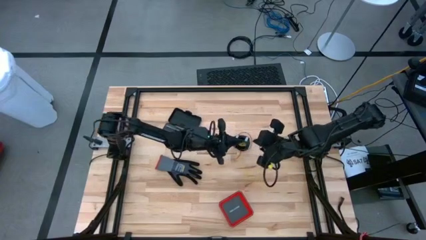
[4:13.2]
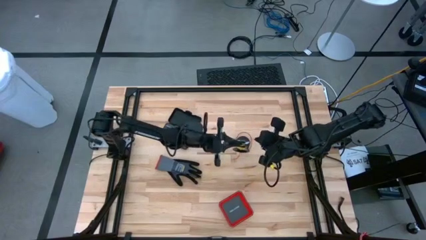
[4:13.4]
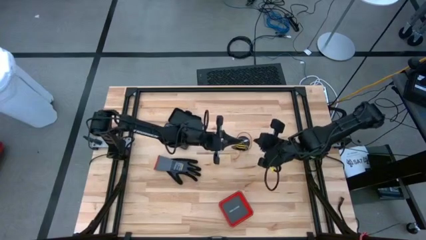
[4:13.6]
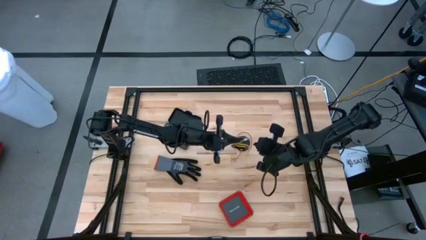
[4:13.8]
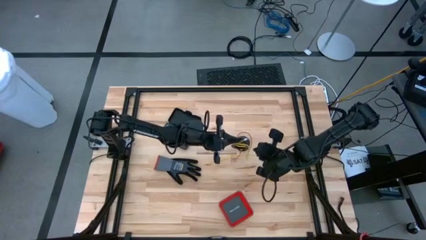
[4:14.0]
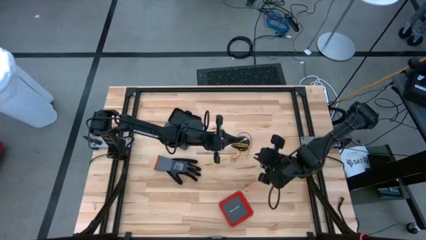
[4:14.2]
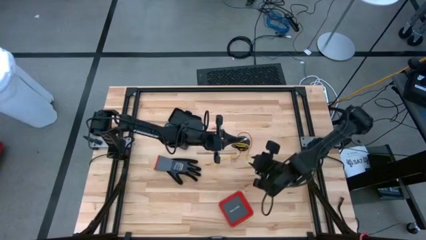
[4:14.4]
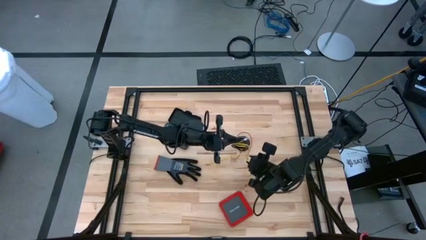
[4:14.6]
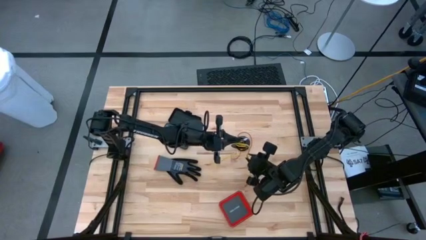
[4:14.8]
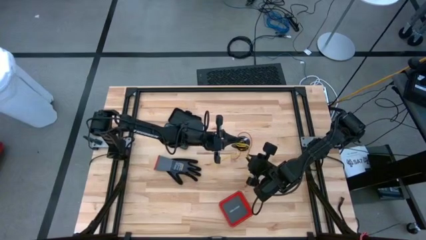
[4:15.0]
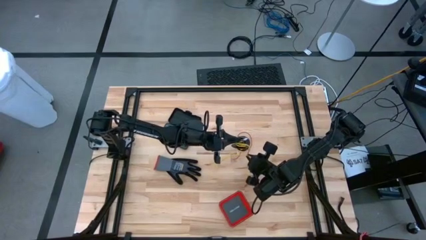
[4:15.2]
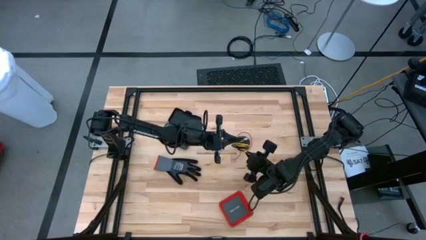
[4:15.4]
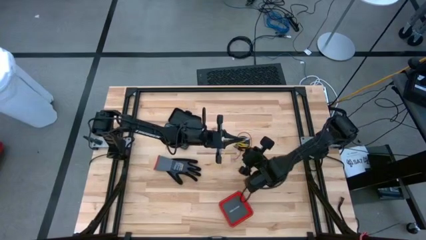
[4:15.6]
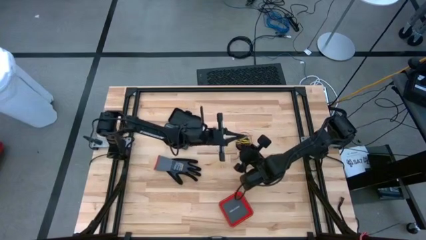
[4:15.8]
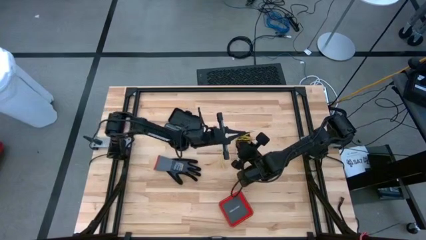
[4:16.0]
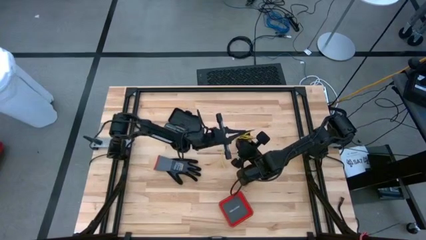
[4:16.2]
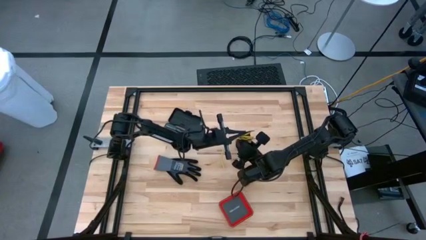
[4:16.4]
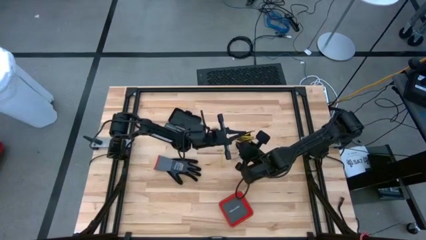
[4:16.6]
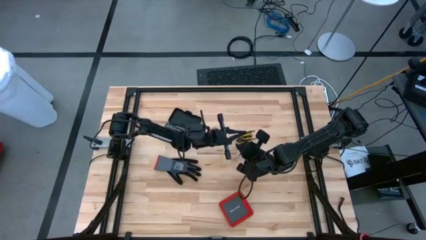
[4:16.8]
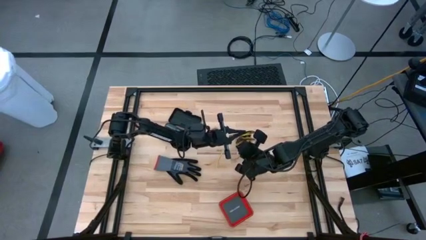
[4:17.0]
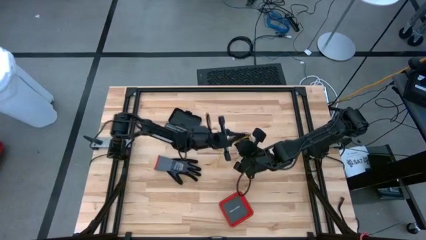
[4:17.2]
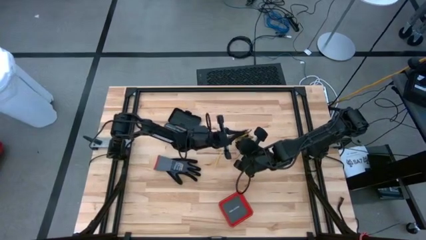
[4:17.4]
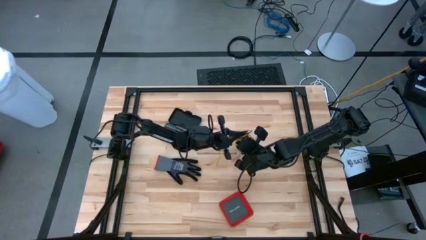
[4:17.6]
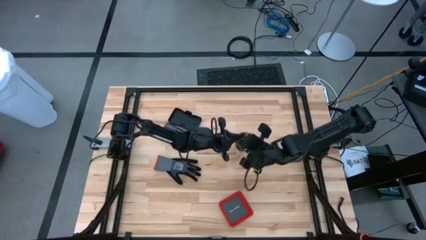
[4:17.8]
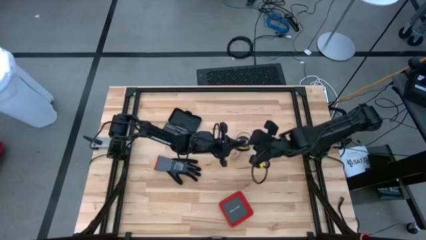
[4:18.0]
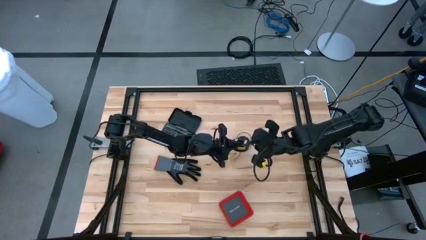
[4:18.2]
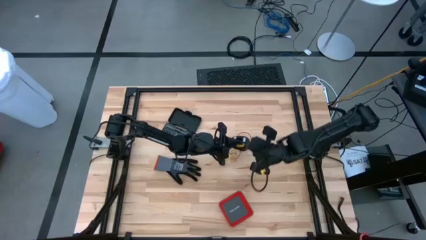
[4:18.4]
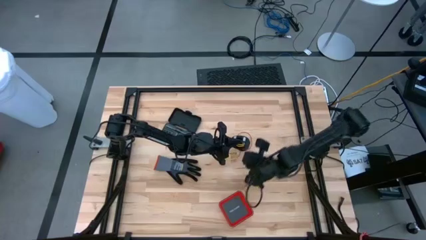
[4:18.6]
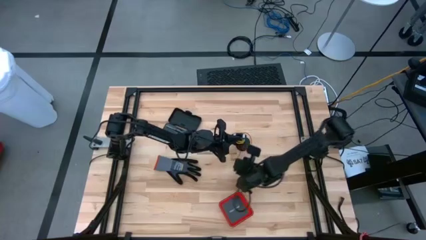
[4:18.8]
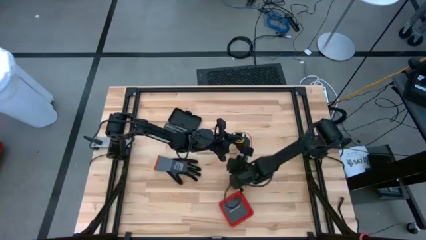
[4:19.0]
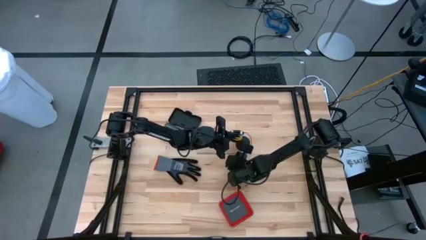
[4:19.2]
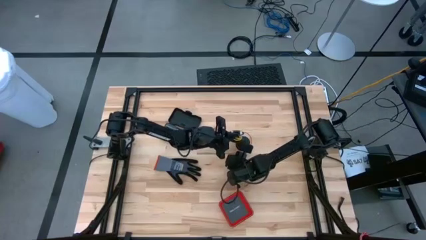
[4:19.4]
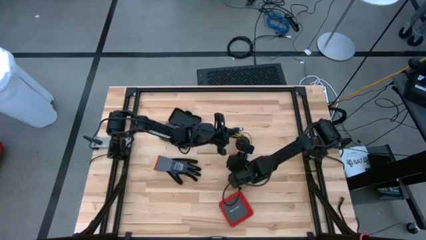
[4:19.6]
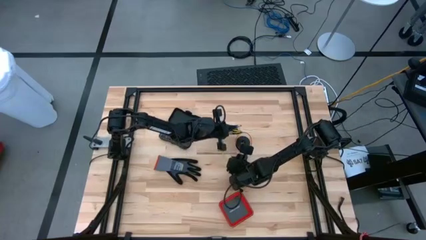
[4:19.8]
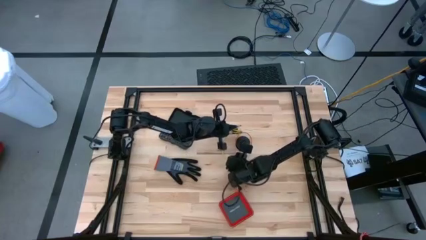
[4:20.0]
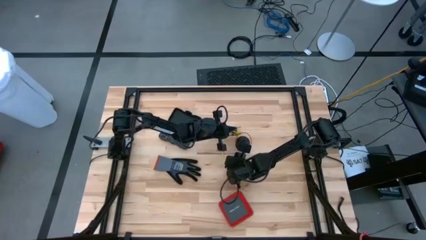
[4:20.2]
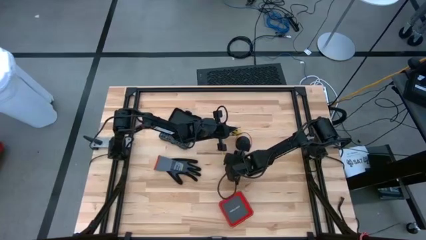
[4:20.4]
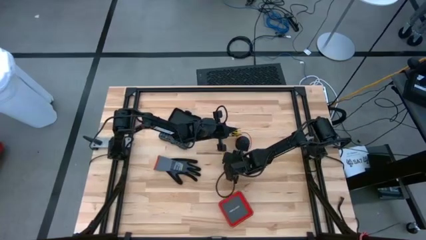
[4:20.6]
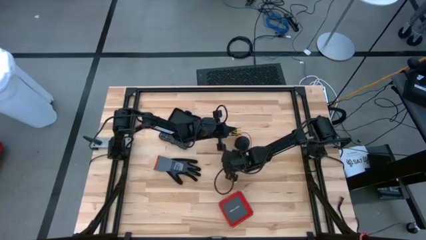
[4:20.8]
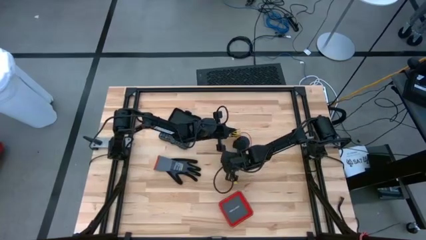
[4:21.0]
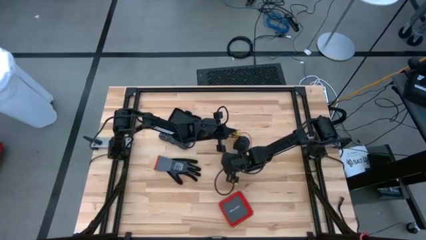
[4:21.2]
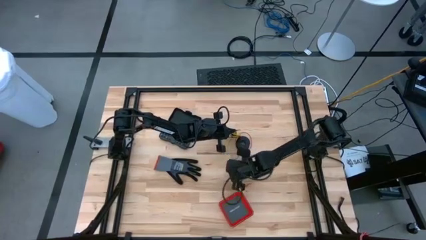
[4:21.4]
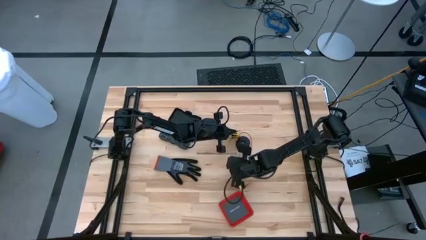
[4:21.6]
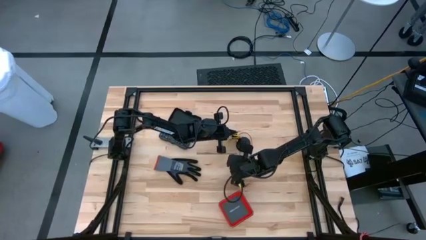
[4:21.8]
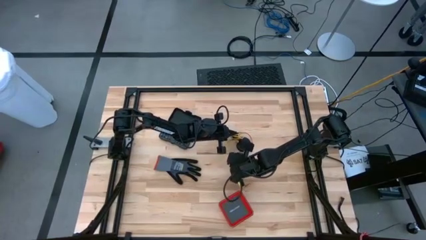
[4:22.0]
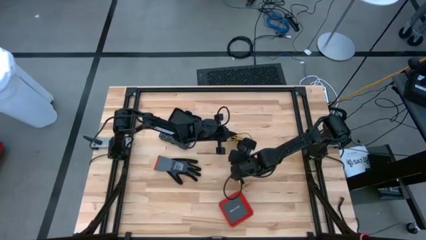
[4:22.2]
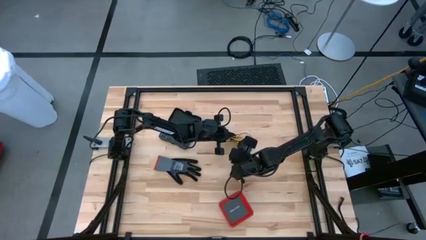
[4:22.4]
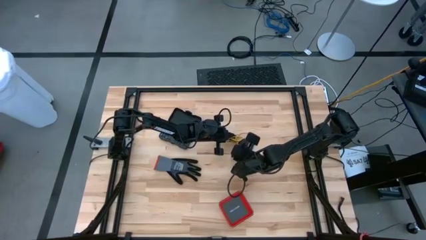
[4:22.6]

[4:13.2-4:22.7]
Task: Coil cords
Coil the yellow wire onto the spool
